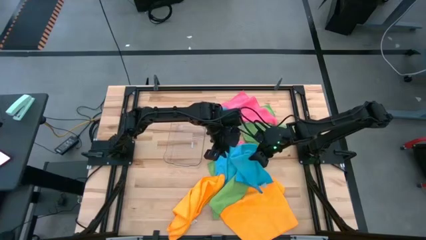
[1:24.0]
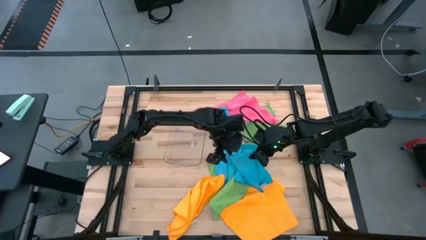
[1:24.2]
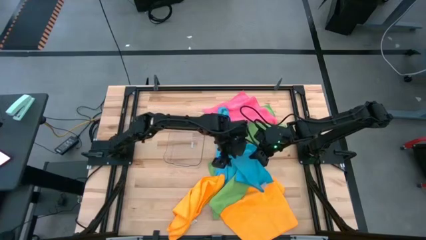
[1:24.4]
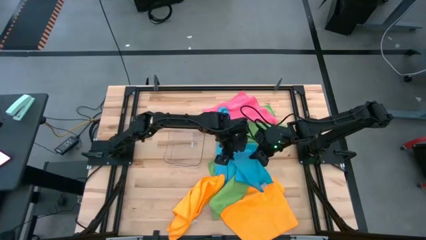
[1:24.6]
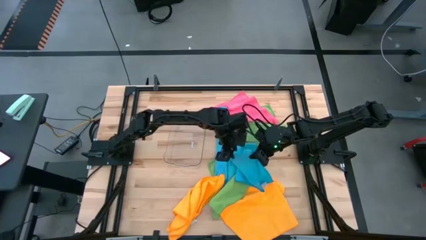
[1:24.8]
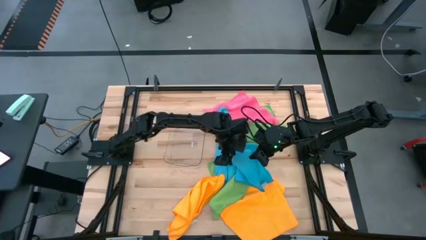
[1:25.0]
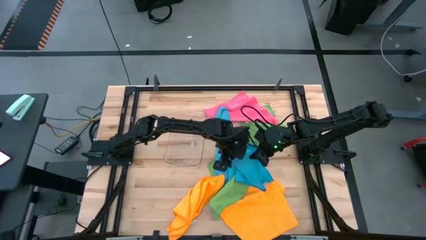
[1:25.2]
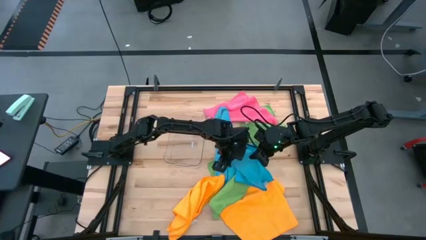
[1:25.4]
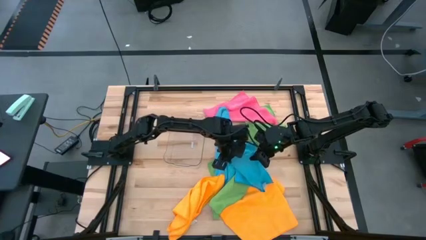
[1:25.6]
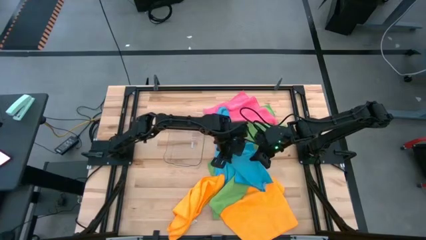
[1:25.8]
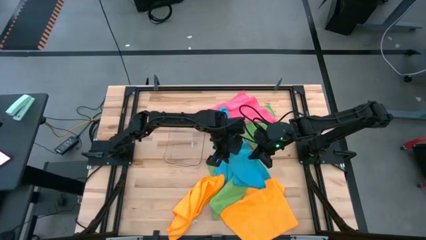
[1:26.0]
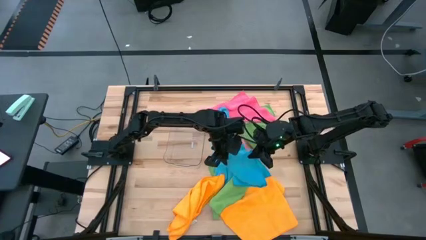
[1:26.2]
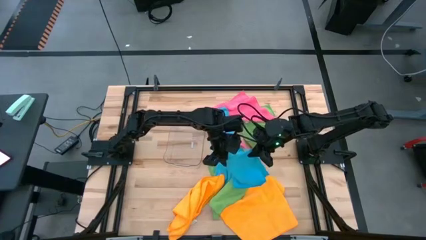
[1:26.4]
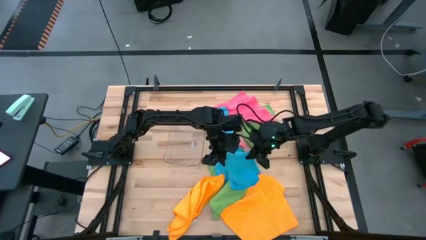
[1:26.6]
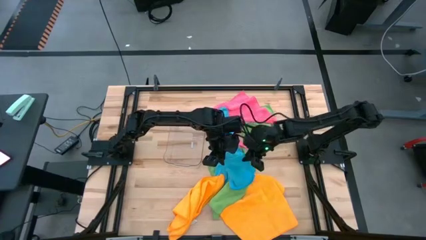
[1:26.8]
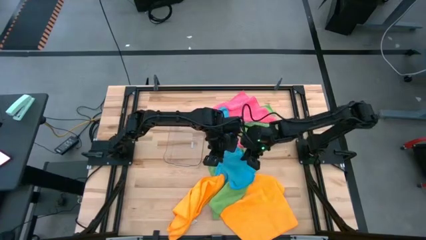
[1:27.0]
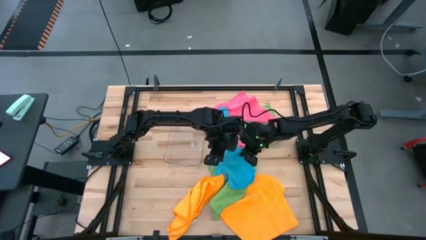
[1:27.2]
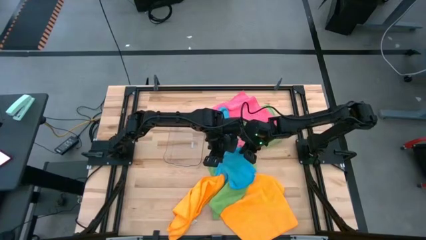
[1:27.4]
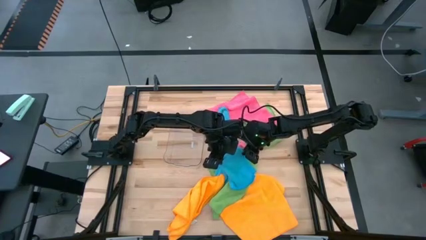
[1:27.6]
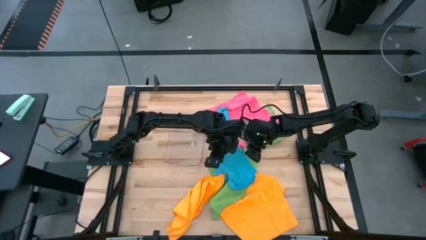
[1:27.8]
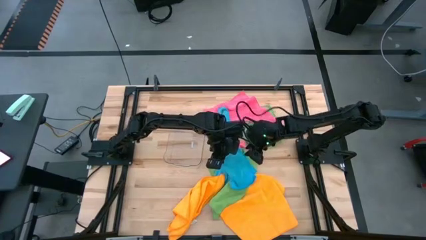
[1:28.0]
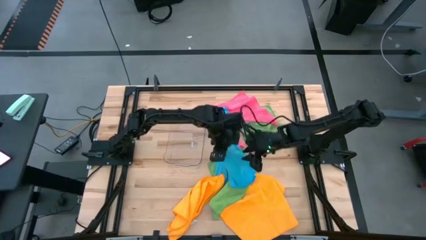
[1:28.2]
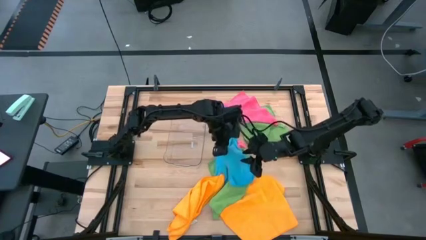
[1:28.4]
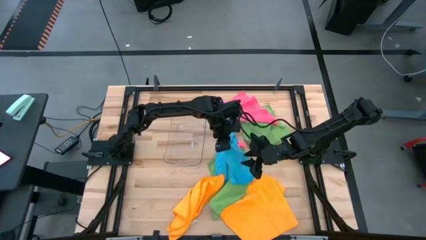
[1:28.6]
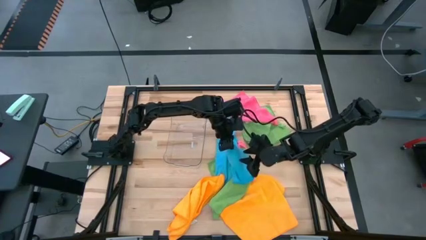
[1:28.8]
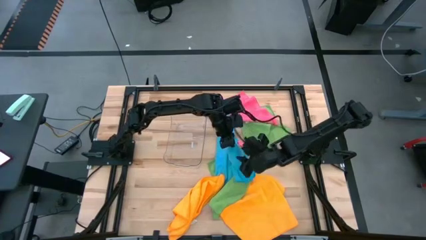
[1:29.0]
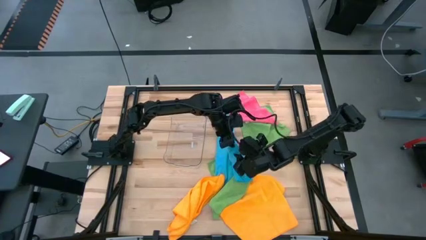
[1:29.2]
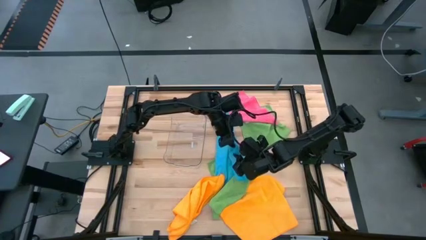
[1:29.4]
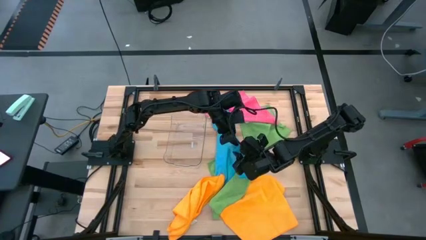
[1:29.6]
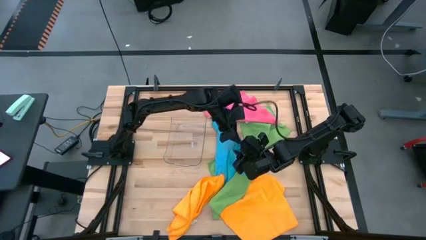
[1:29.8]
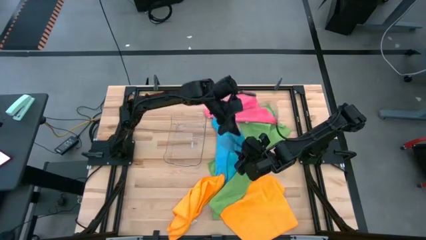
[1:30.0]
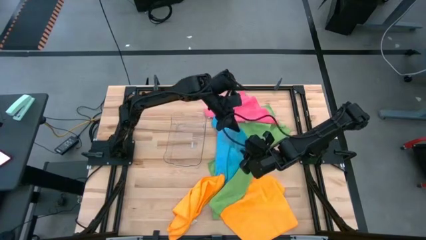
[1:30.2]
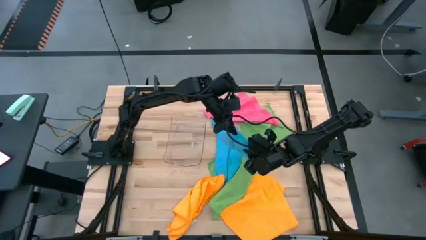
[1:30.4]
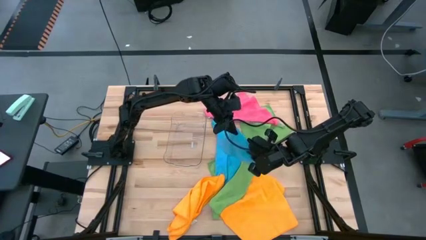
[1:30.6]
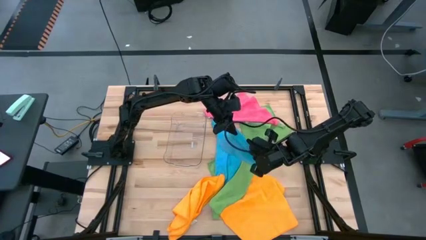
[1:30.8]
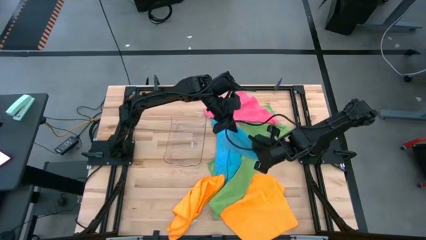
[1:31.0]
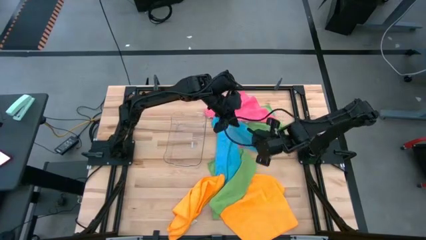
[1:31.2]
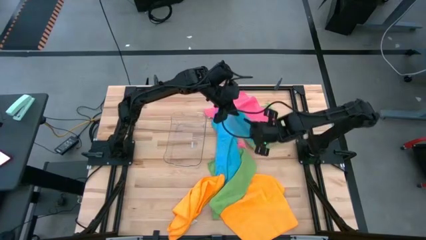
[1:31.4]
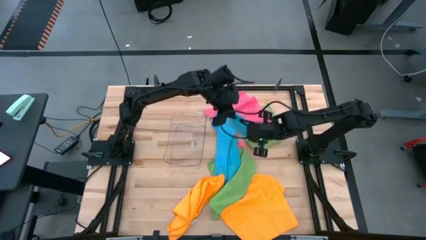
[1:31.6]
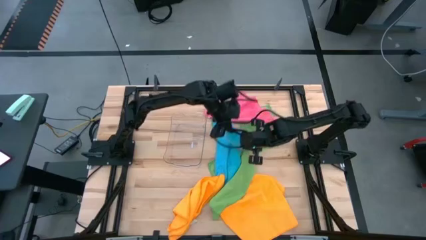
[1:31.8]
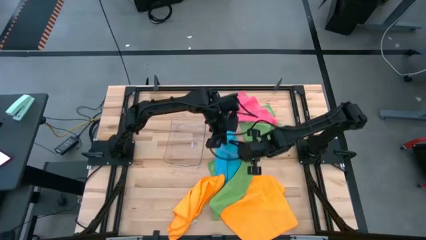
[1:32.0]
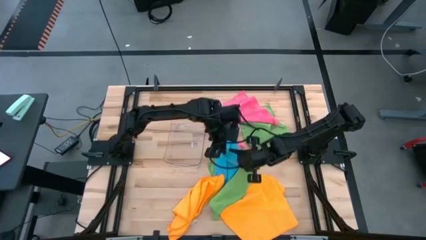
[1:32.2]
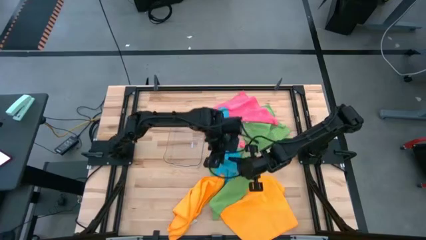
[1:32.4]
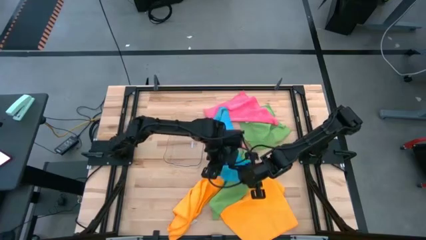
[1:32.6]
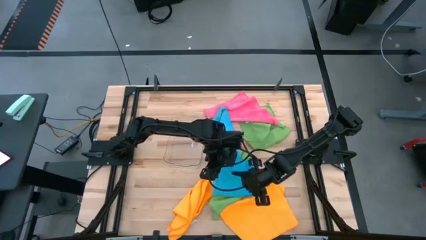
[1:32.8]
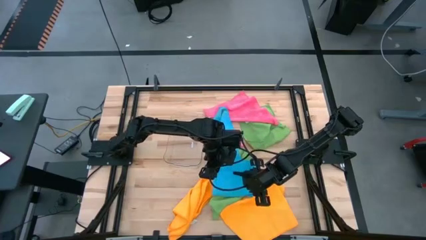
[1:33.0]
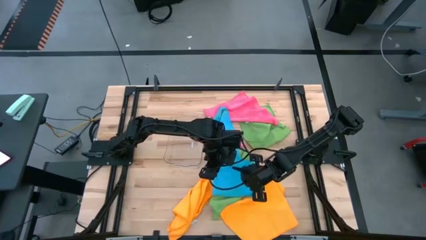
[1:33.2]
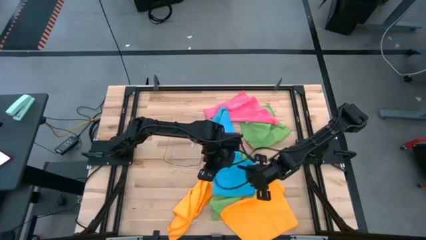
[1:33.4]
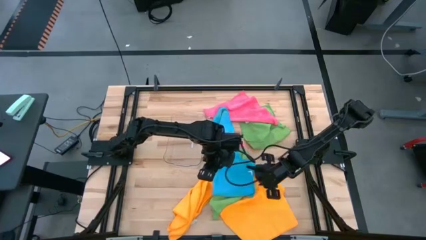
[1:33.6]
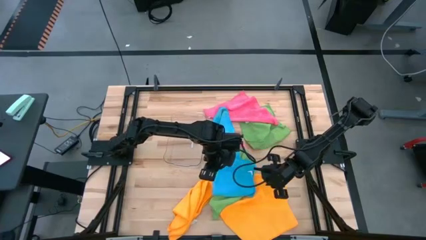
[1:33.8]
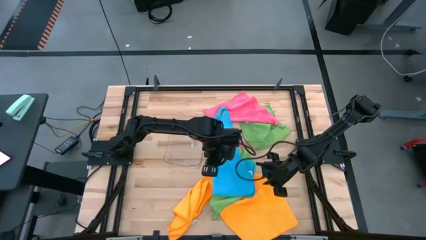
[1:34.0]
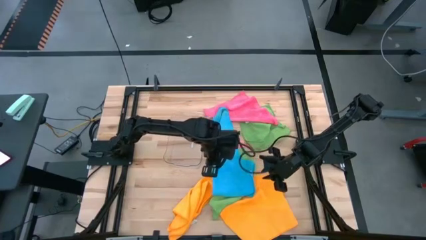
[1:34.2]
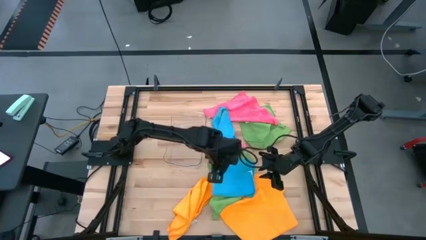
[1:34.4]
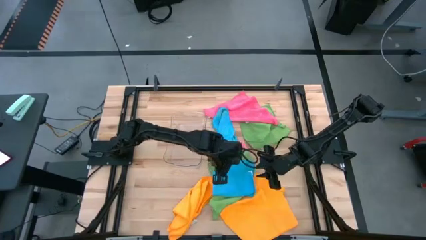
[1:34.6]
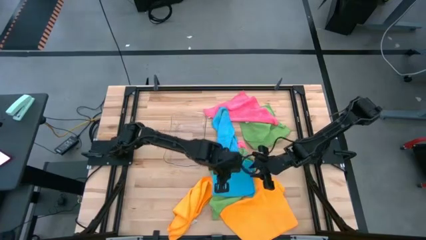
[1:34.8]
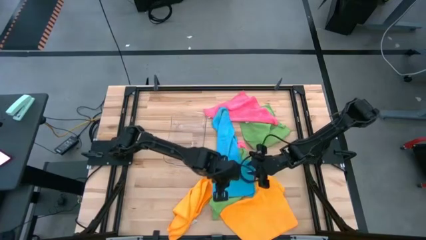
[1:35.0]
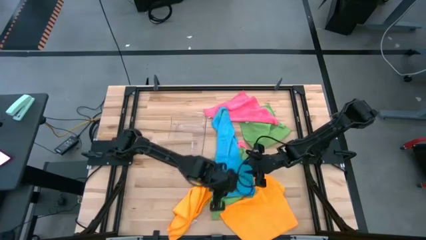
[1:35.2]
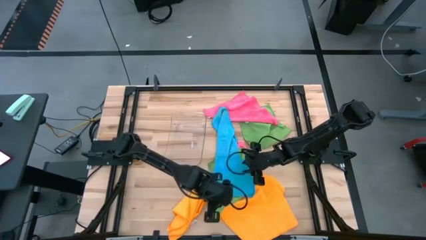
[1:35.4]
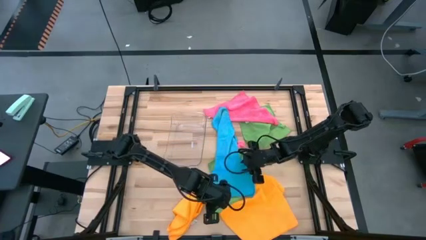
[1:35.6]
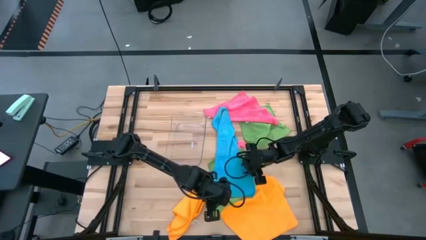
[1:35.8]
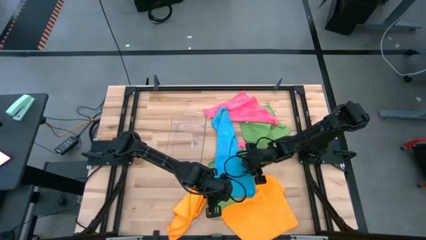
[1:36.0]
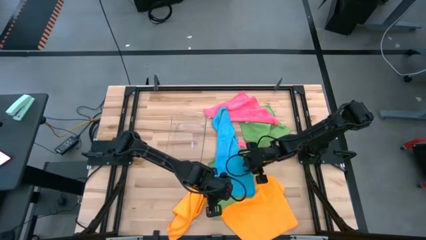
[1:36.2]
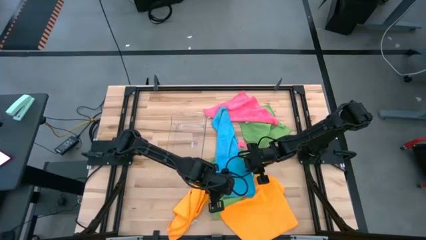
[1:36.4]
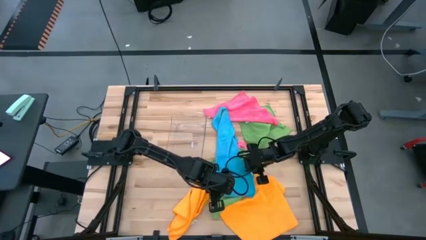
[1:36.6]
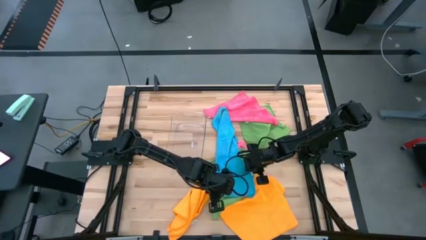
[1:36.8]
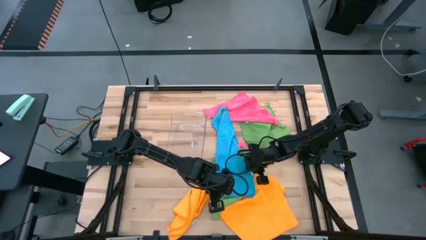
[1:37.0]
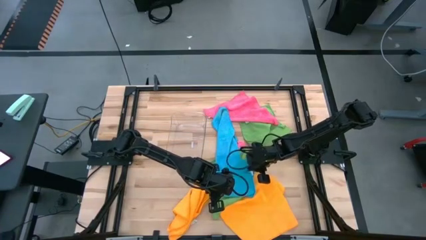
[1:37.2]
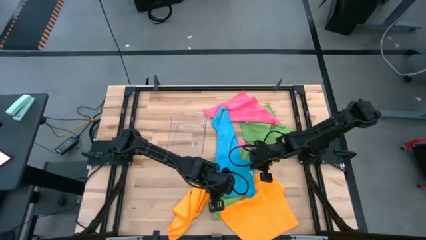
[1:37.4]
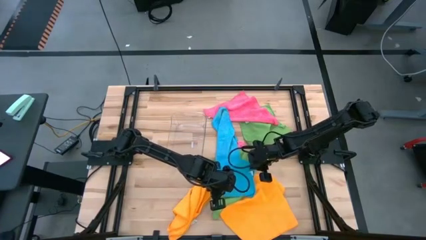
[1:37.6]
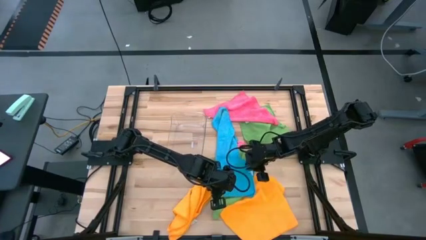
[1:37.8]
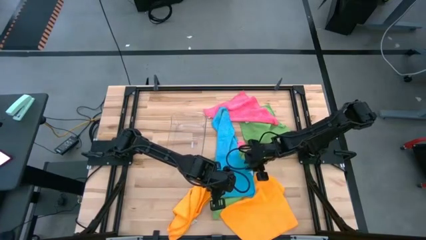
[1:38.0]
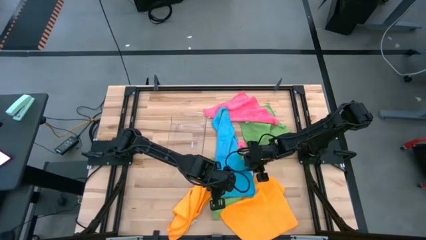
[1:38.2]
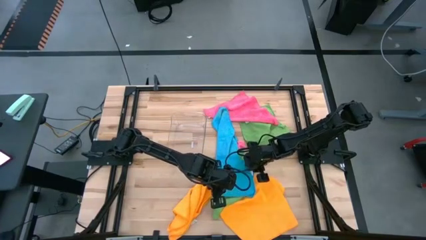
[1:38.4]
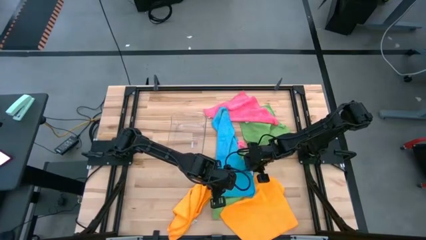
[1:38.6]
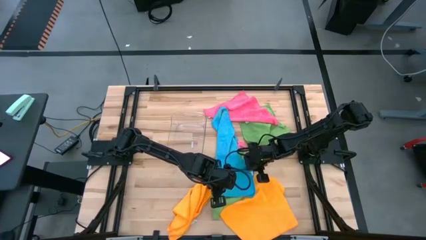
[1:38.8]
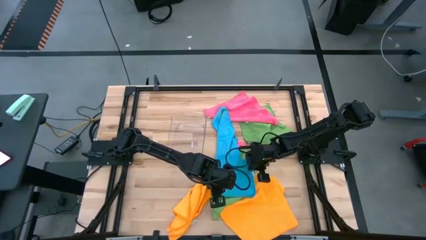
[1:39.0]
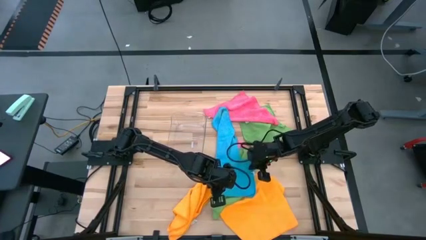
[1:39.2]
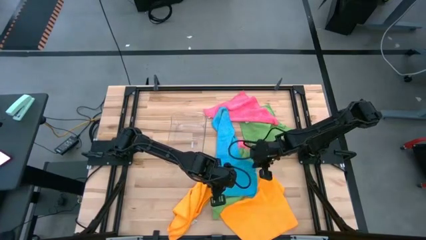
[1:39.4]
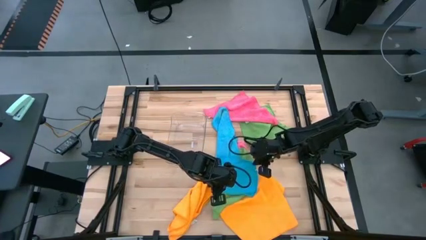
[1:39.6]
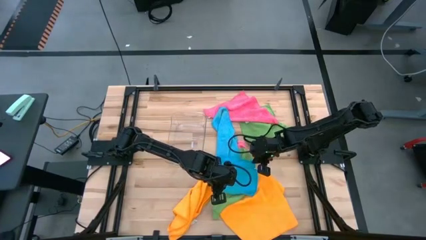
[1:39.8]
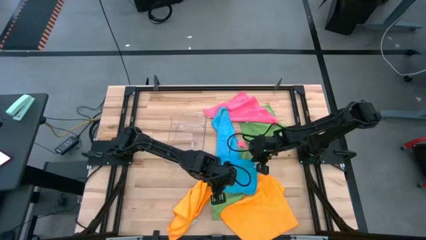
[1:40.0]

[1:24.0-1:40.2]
Task: Fold microfiber towels
Fold the left blue towel
